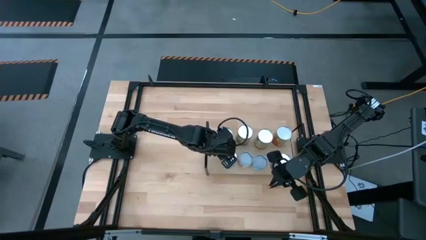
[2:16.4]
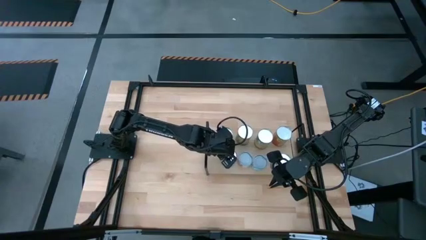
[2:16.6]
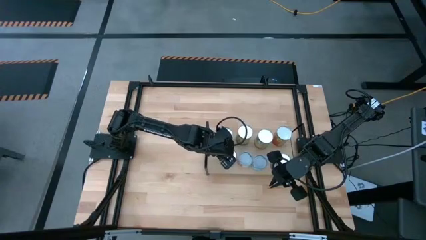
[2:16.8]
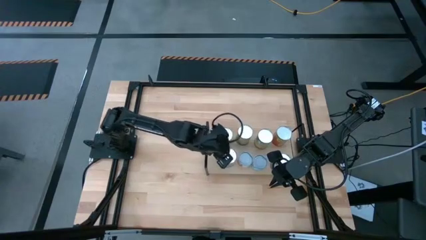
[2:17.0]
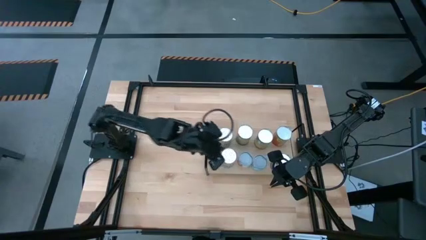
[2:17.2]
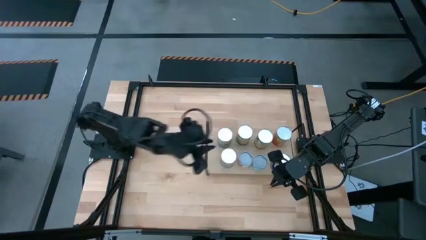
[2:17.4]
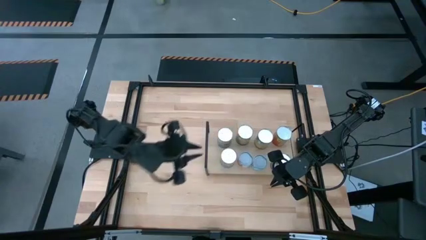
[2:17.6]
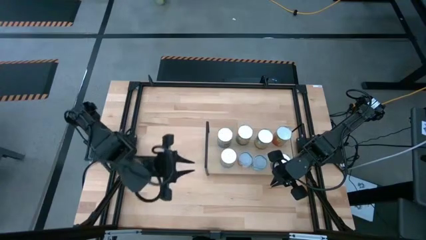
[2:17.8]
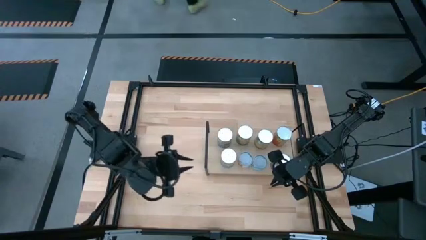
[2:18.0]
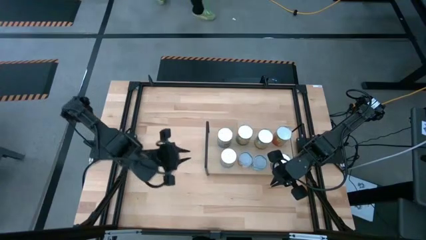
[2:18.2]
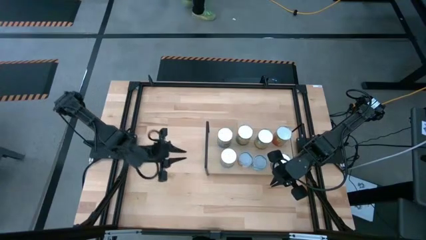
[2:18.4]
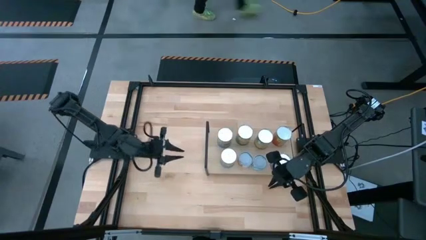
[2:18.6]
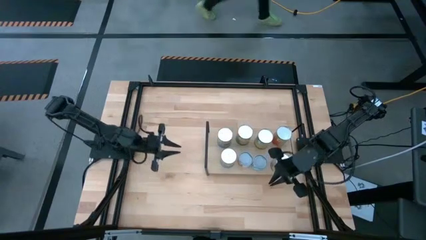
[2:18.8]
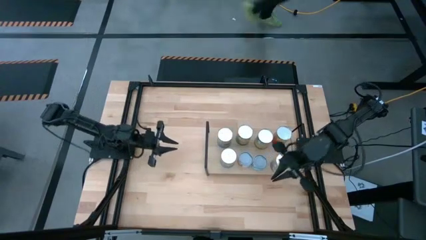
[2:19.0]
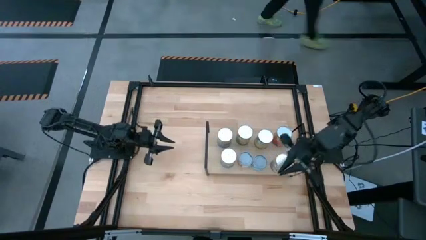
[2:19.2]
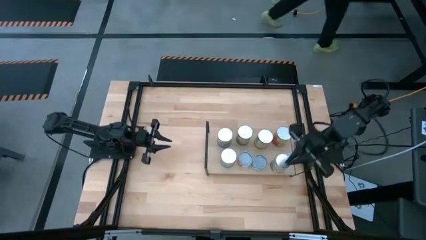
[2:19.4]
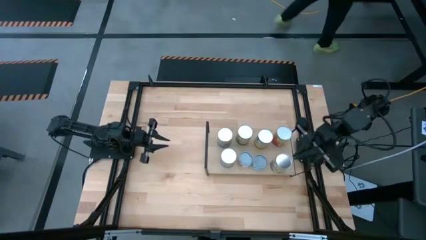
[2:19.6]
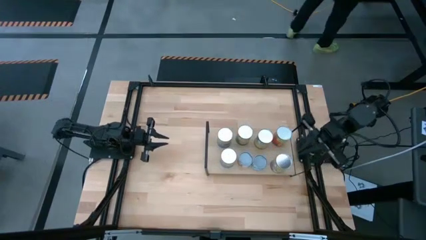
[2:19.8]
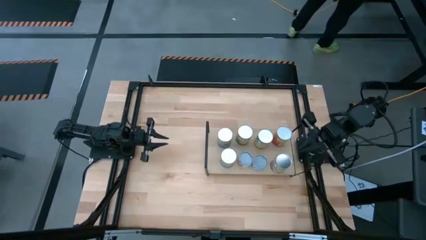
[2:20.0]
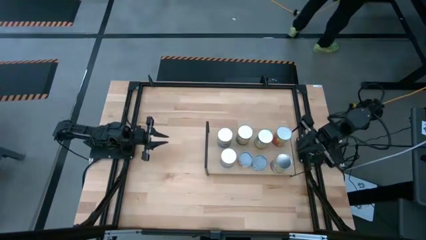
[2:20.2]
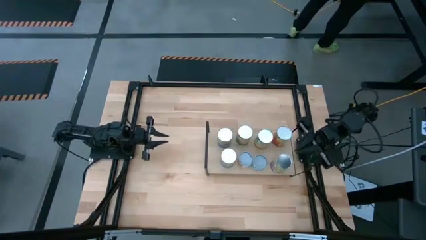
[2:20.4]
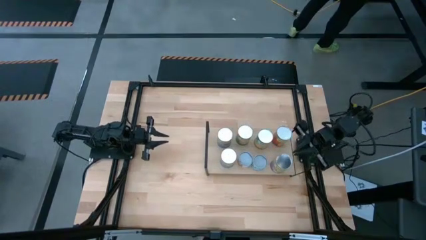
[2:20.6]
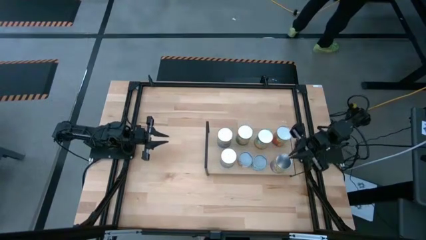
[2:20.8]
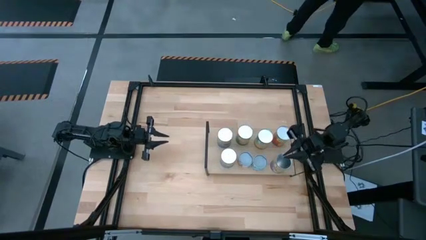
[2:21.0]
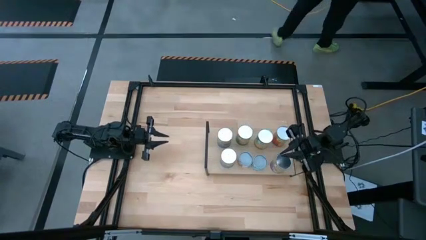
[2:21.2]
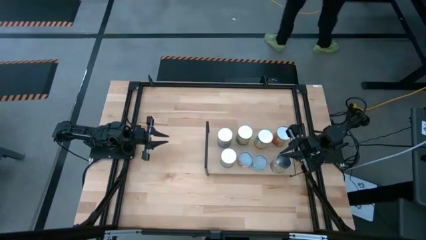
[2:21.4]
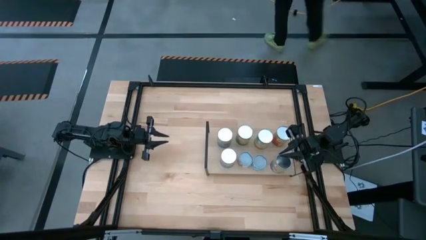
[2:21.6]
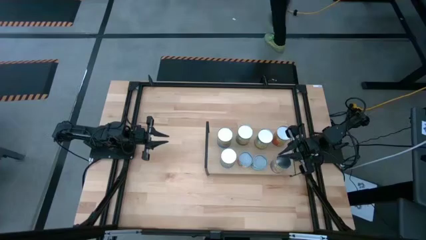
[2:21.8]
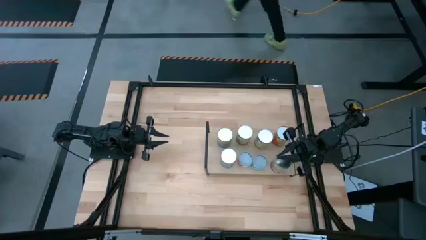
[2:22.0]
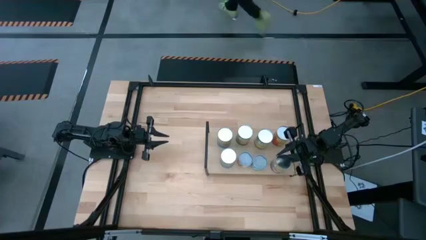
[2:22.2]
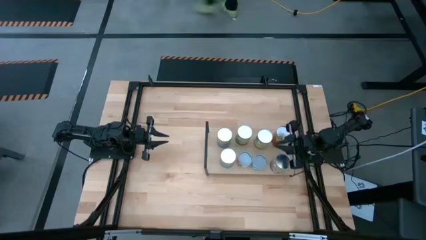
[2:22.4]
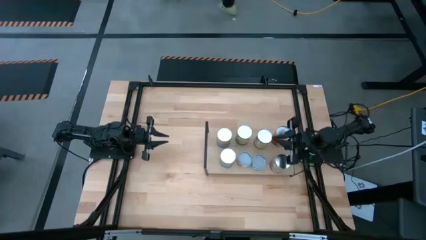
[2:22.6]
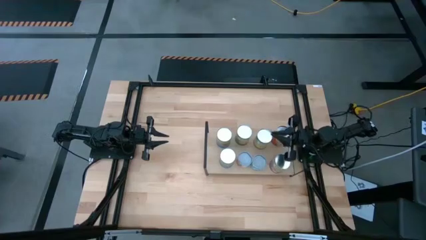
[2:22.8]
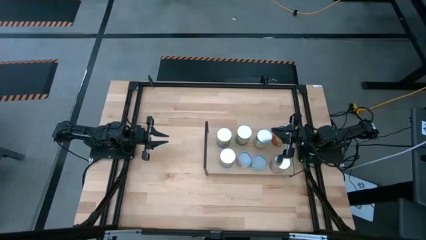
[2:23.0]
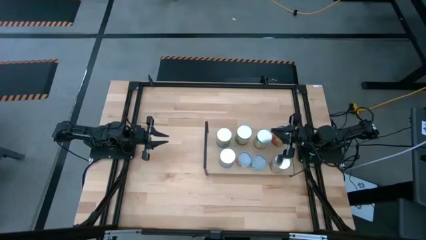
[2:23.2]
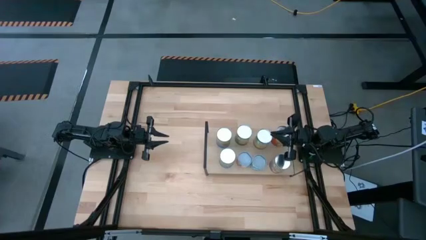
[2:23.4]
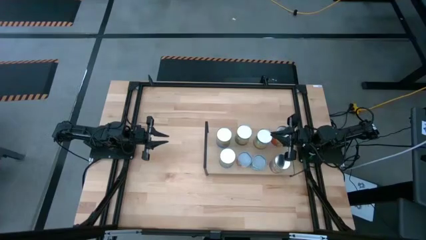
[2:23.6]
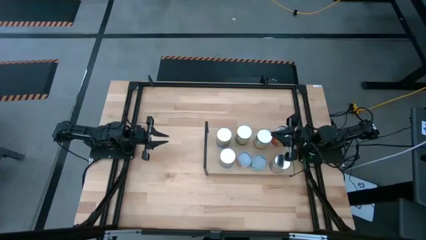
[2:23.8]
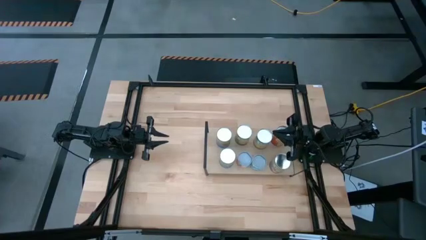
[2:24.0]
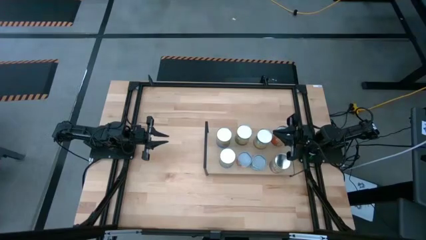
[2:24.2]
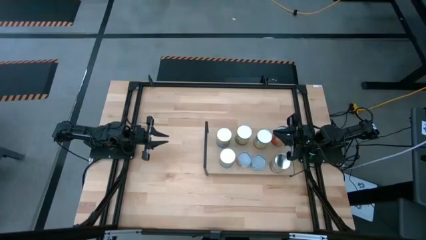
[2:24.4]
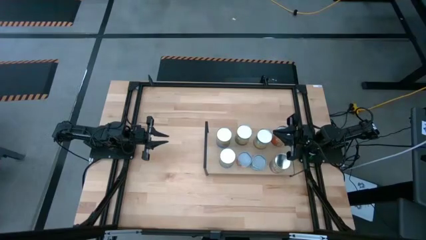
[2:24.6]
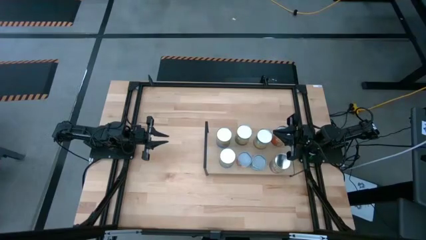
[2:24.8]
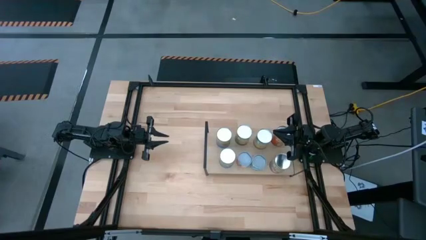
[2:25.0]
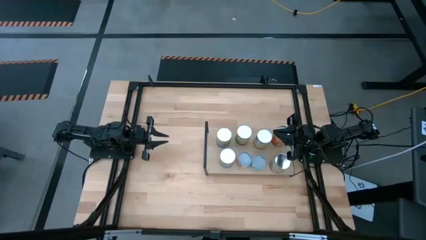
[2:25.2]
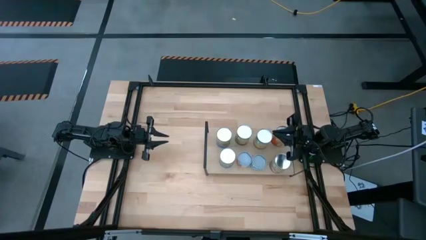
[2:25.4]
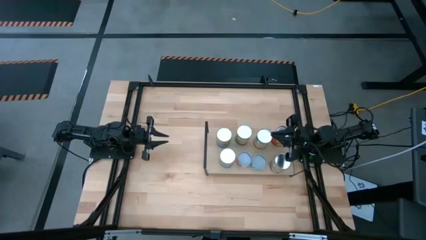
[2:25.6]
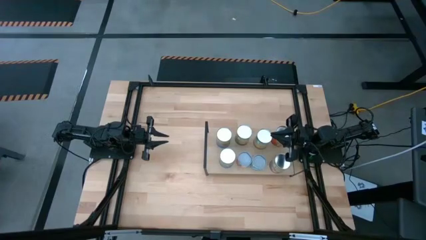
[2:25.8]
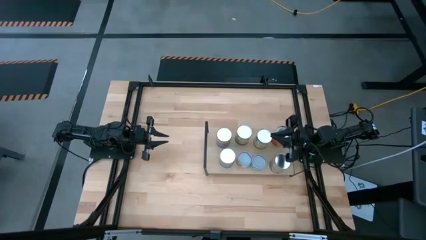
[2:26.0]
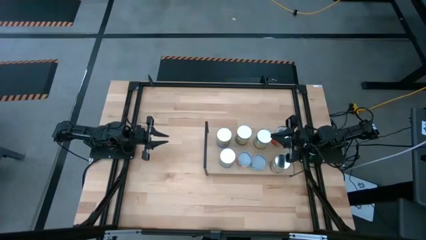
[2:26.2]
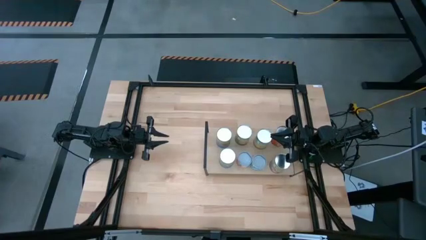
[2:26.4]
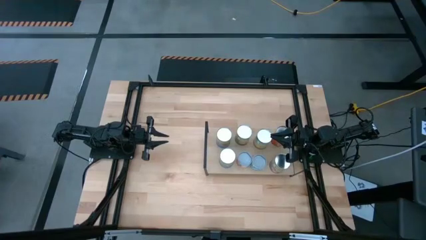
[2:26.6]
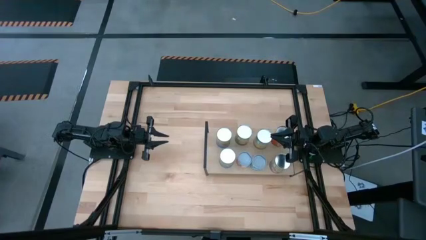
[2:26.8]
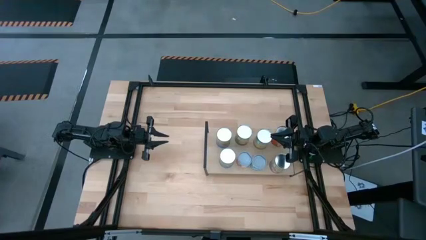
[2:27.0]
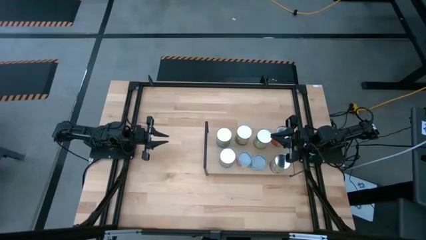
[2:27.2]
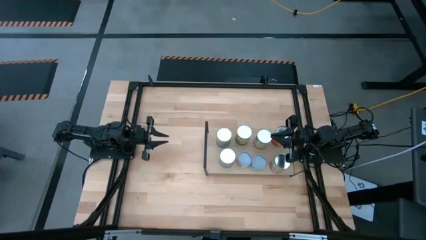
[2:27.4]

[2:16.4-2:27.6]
Task: Pick and place cans onto a shelf
Return to Home Position

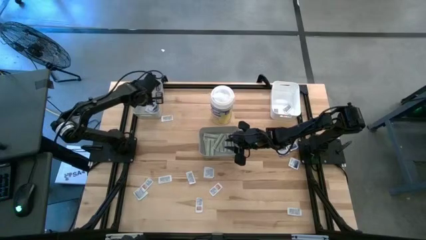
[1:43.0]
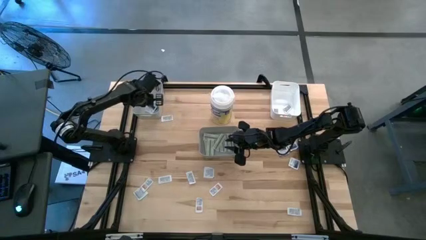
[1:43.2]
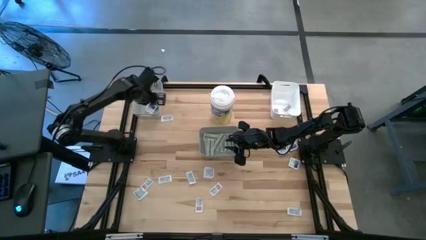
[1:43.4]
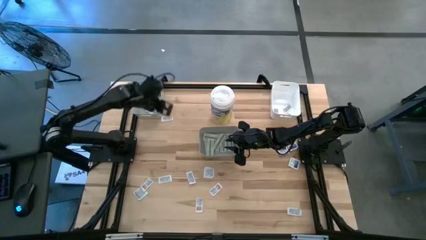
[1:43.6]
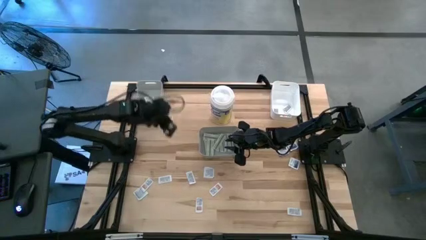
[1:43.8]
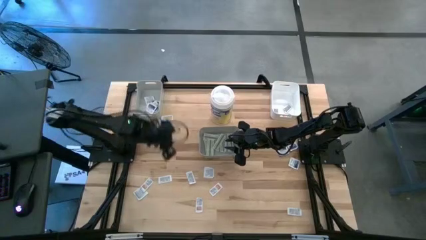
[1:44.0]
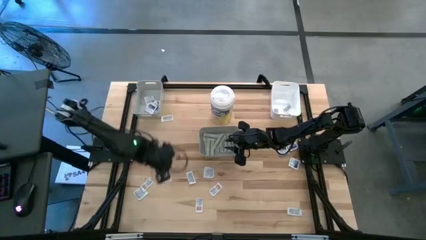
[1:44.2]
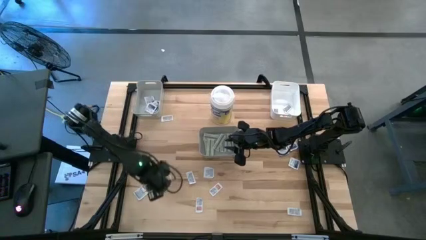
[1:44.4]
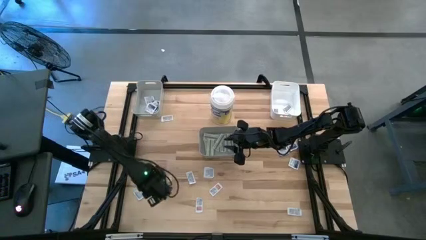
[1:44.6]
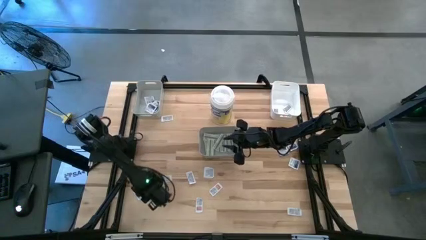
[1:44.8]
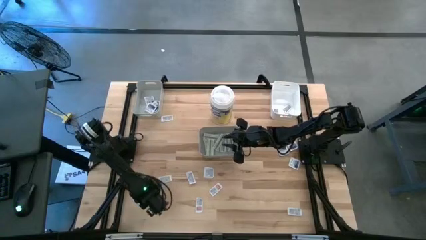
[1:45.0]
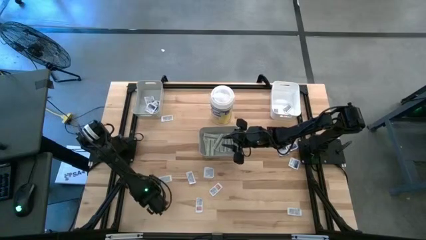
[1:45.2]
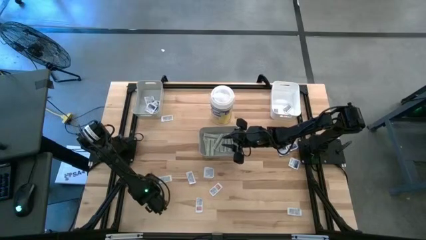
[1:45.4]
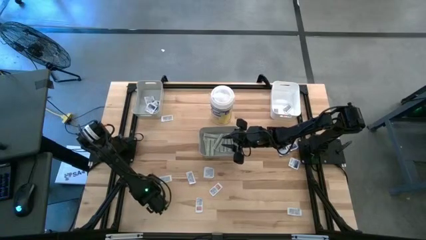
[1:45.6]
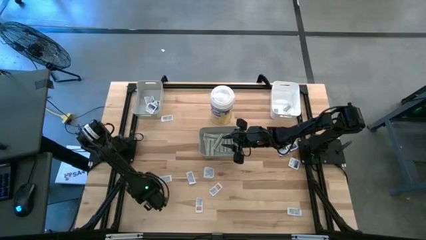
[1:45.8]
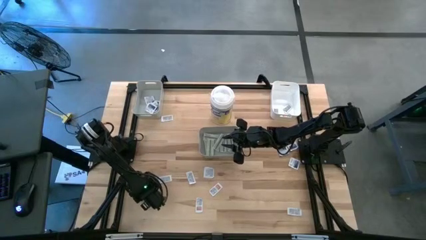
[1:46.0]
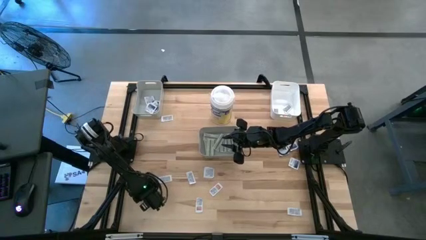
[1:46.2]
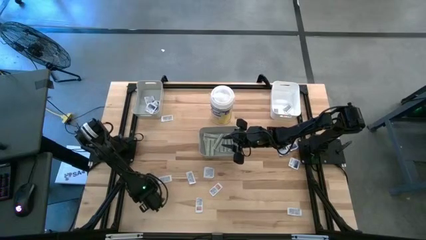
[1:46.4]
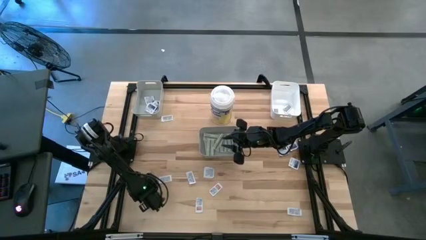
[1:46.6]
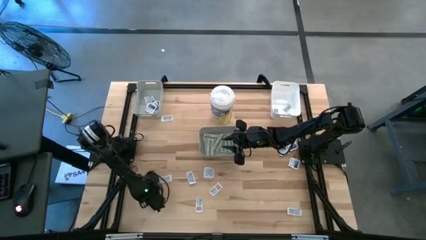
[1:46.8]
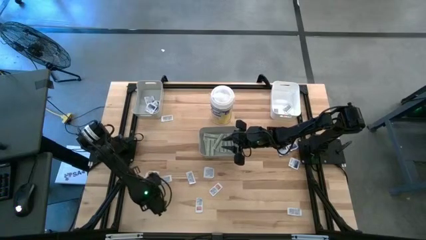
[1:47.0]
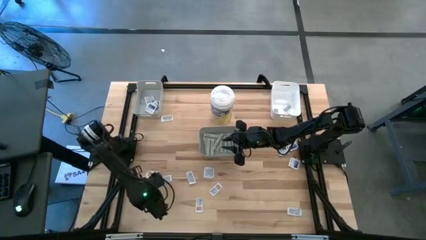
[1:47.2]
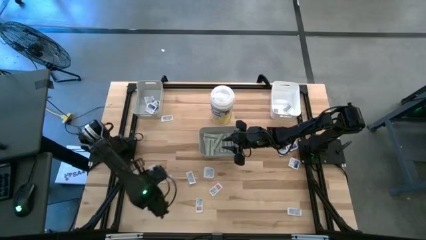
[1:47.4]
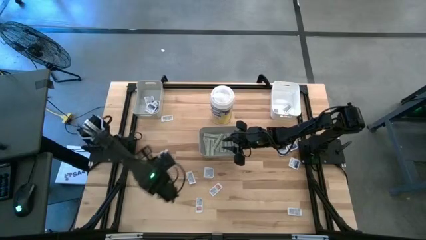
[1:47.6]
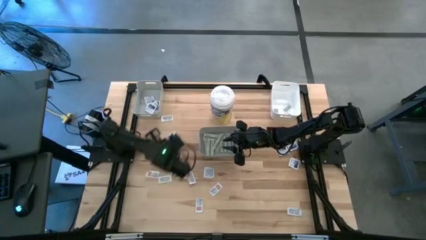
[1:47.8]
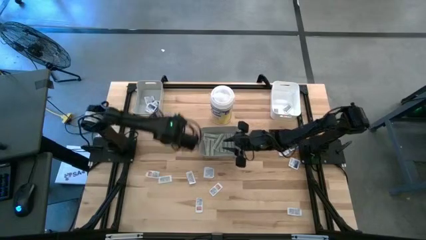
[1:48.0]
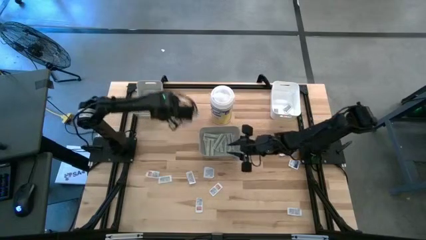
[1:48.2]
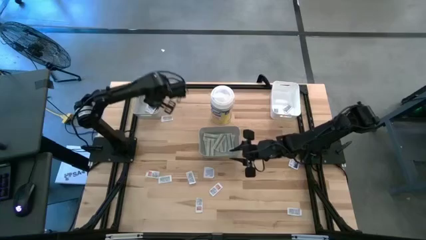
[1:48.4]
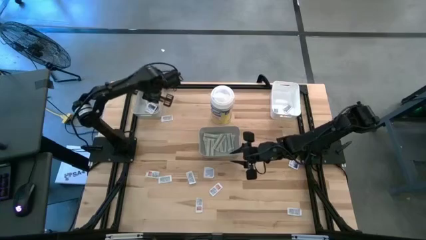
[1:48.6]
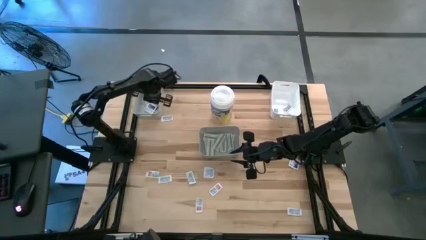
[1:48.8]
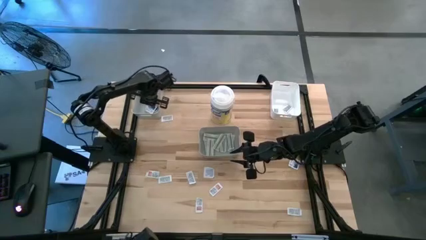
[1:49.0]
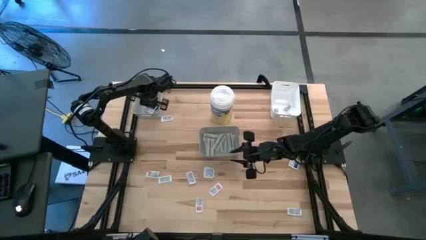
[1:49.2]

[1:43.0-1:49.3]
Task: Pick & Place First Aid Supplies
Put the alcohol pad into the top gray bin
